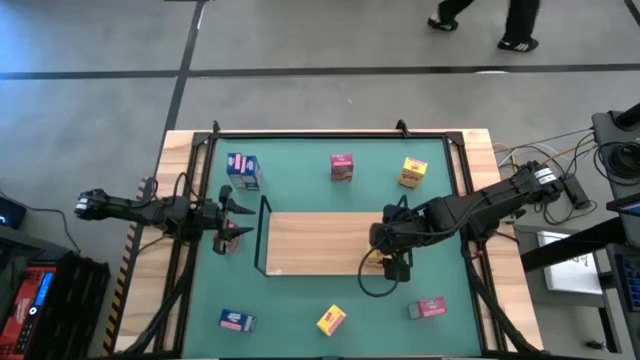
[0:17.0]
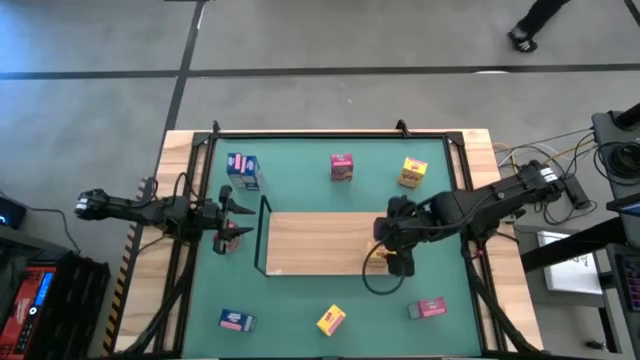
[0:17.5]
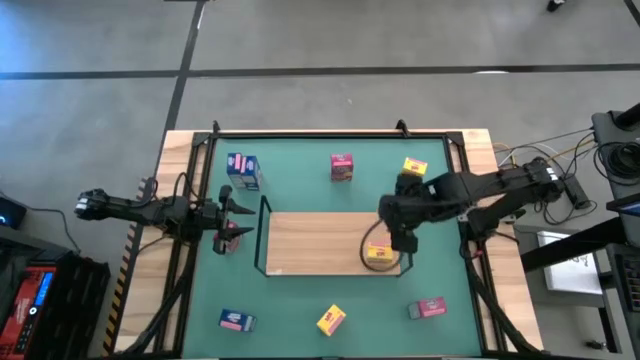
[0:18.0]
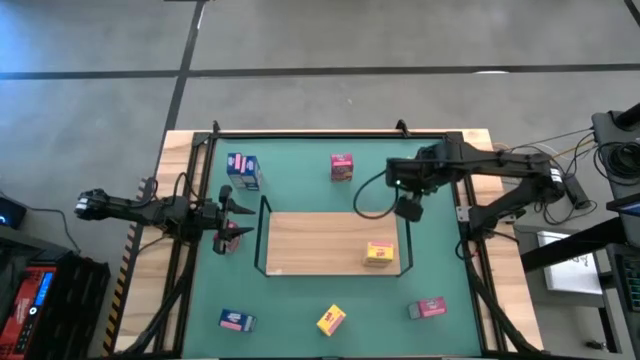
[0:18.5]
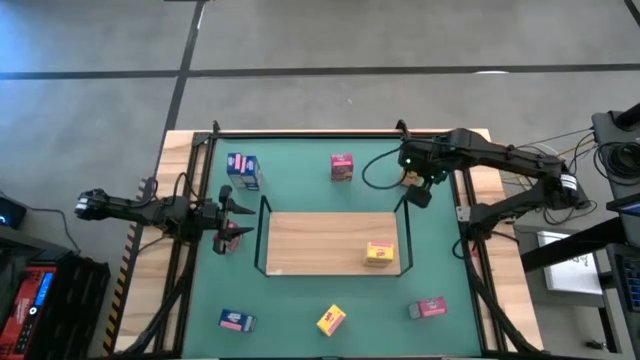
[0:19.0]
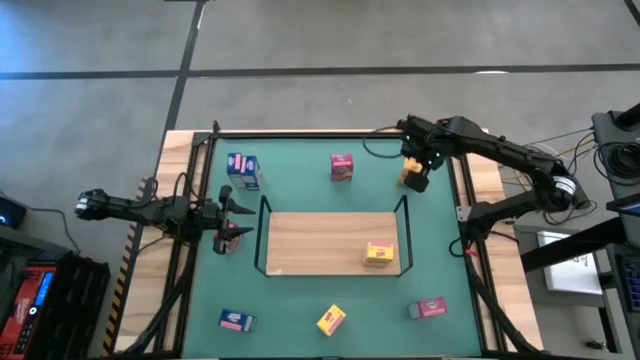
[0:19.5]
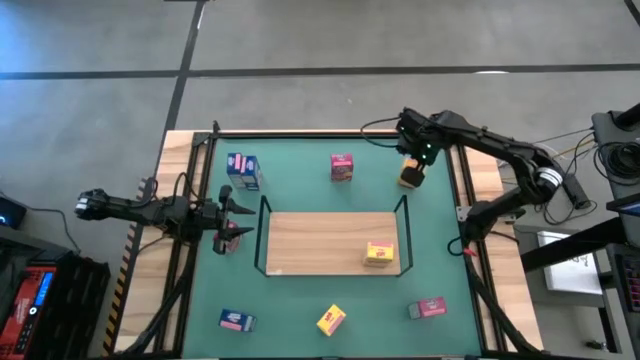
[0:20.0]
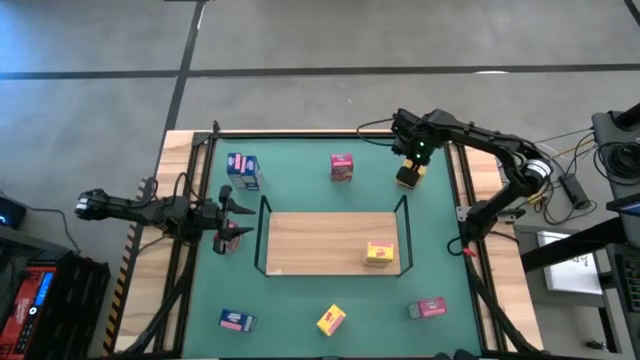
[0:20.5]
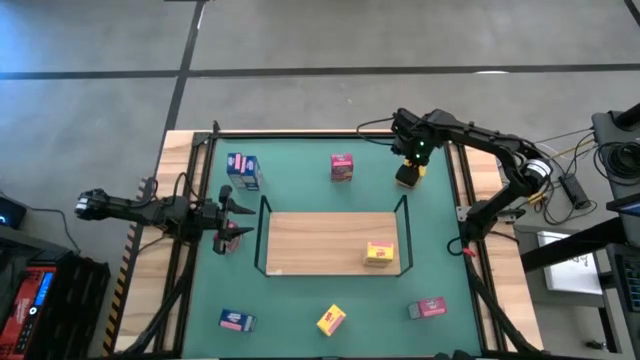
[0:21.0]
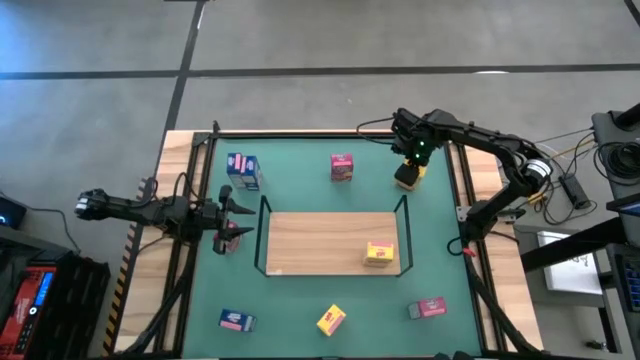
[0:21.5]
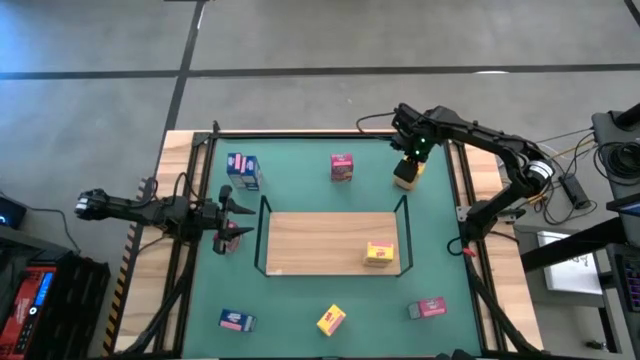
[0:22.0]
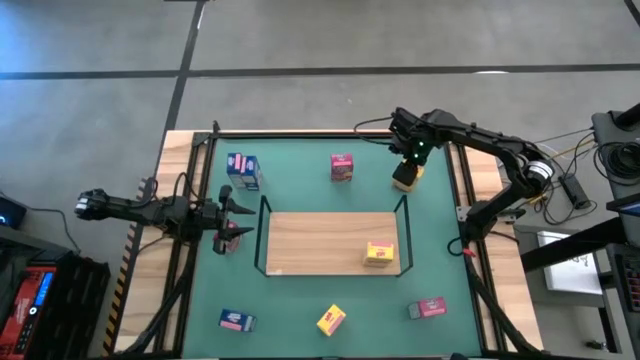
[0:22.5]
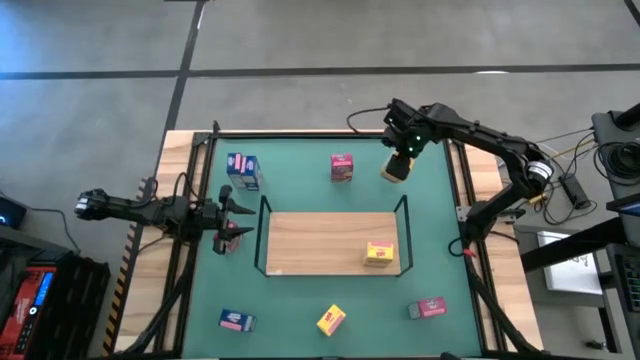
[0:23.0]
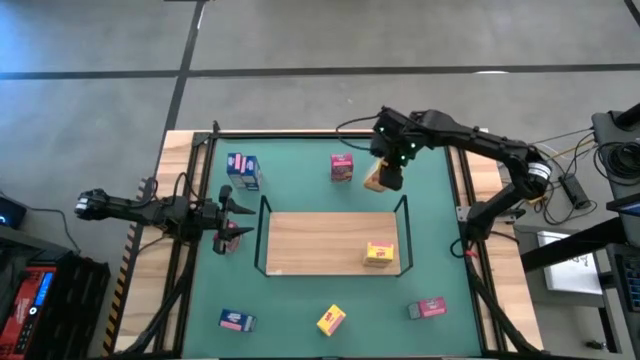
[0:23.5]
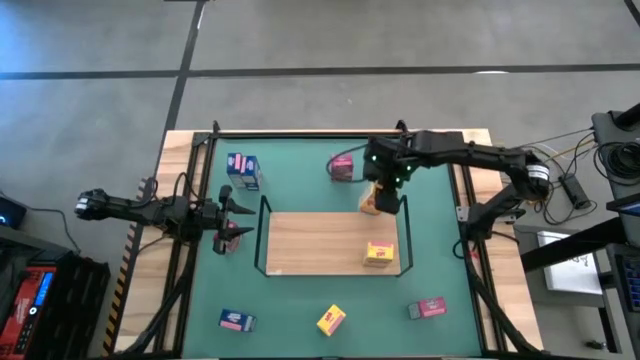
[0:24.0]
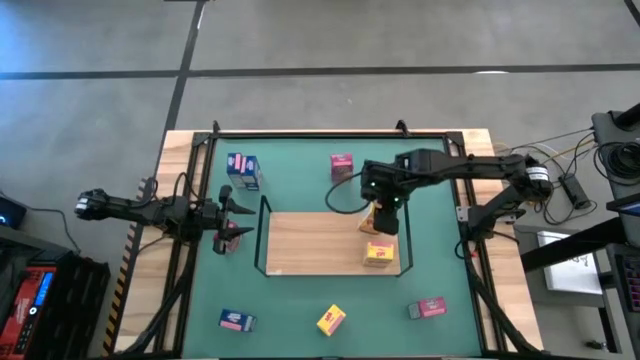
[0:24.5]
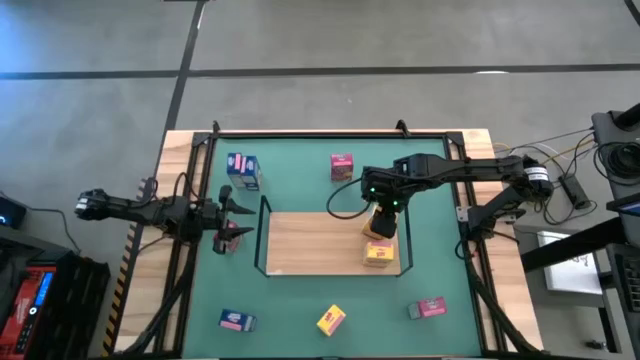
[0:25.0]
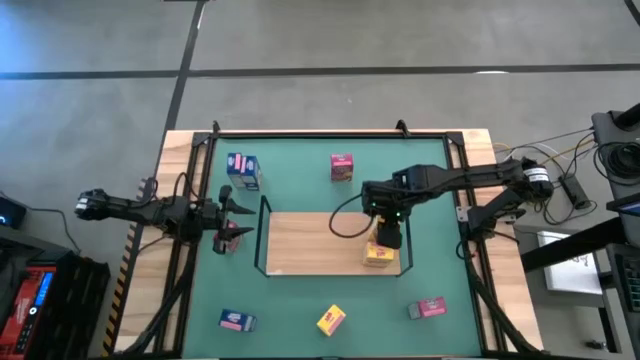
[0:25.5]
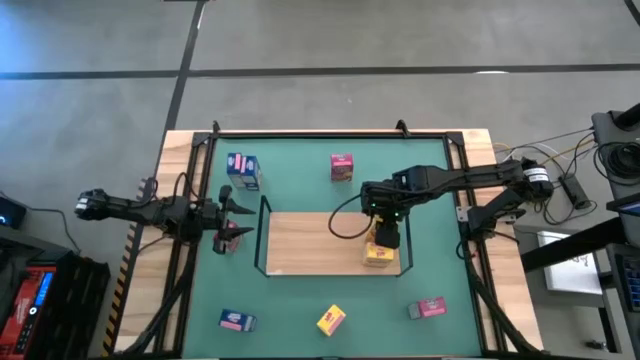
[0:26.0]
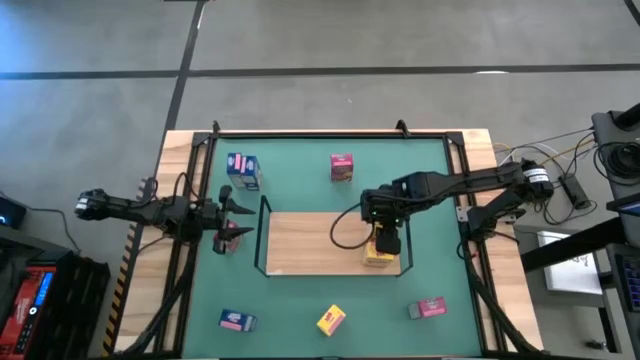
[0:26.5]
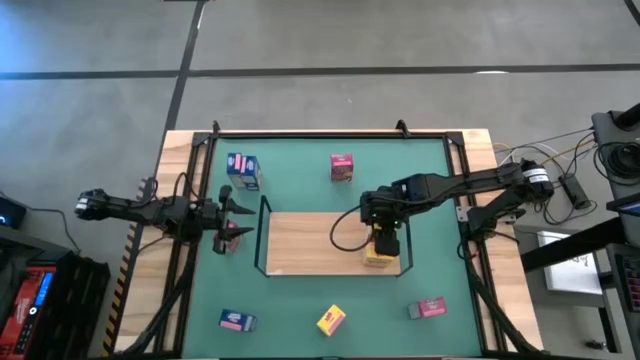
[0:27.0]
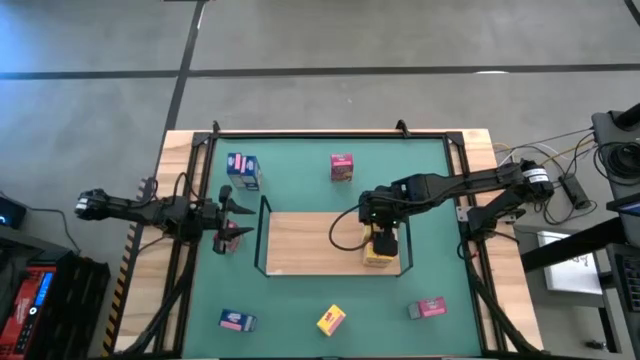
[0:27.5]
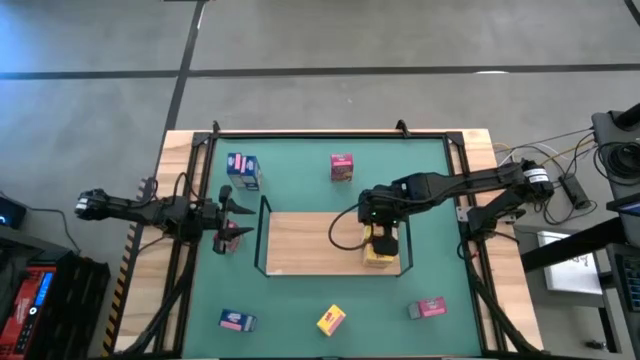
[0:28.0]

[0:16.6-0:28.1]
Task: Stack cereal on shelf
Put the top yellow cereal box on the shelf aligned with the other yellow cereal box

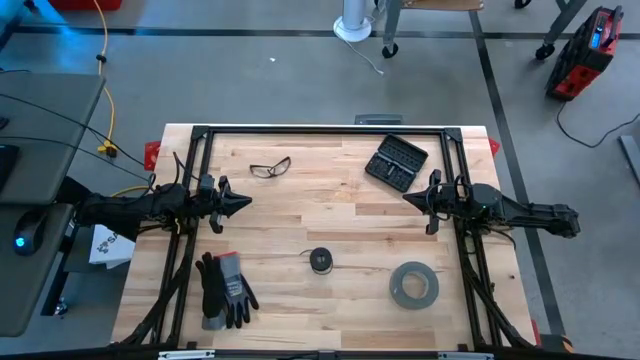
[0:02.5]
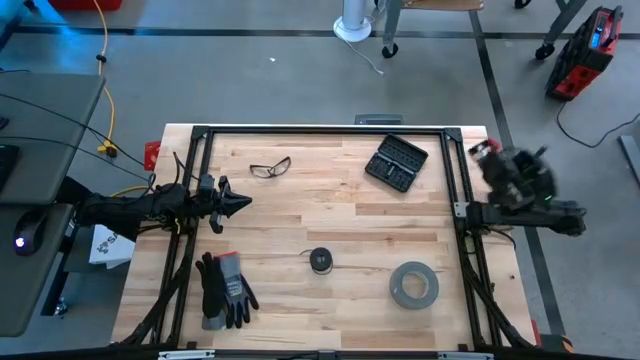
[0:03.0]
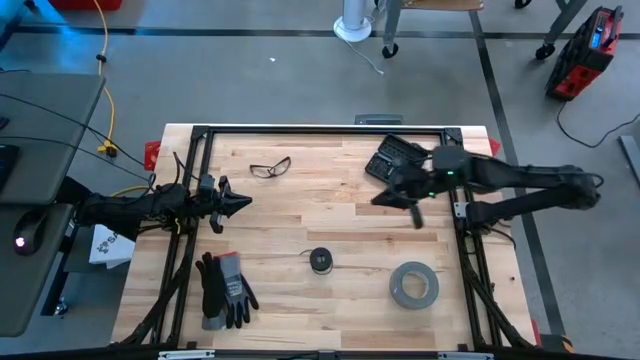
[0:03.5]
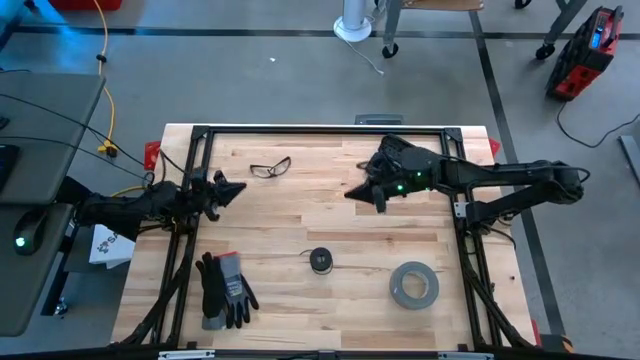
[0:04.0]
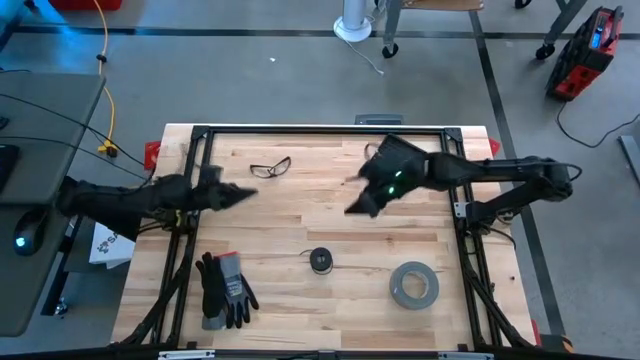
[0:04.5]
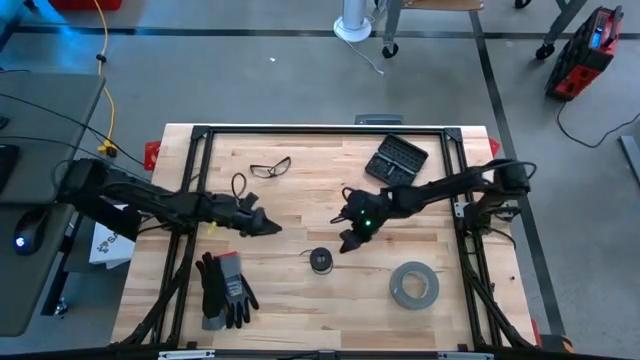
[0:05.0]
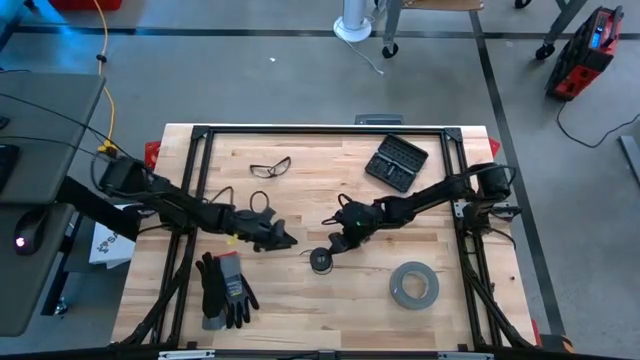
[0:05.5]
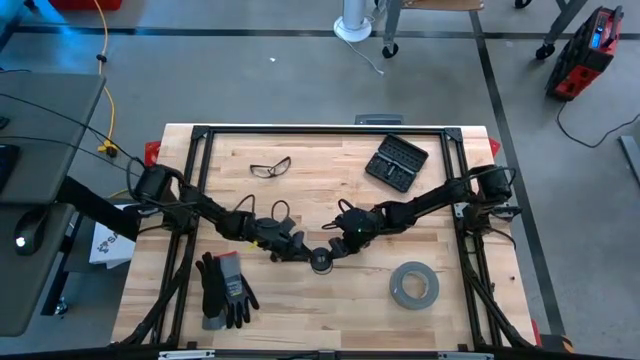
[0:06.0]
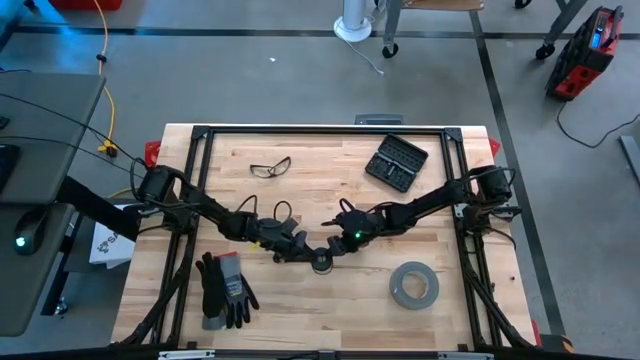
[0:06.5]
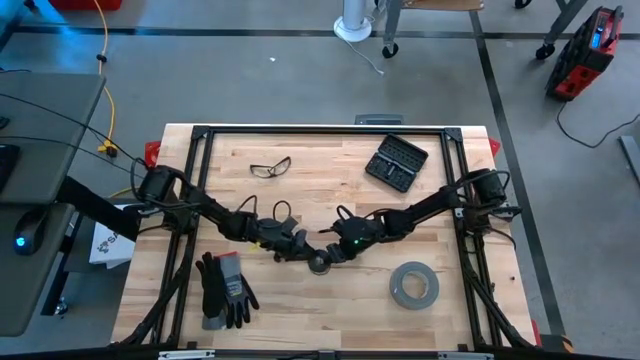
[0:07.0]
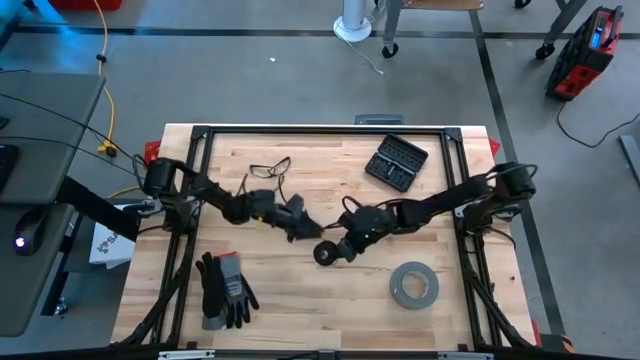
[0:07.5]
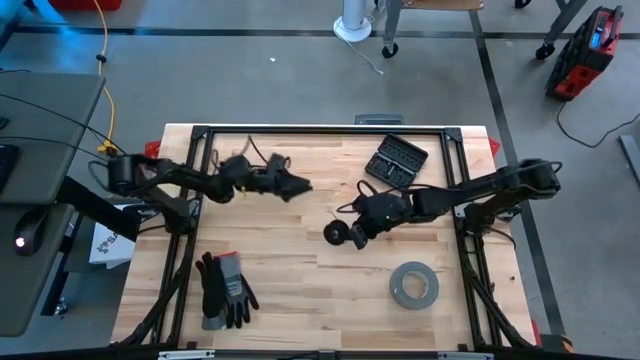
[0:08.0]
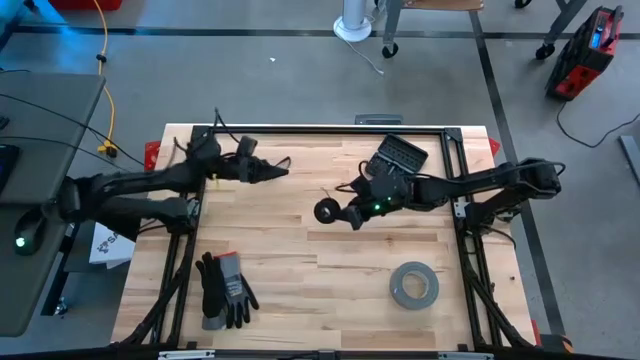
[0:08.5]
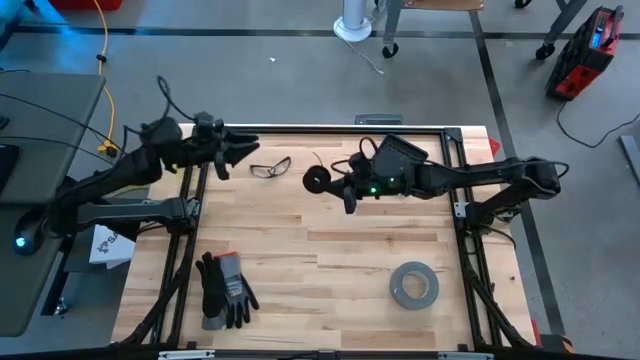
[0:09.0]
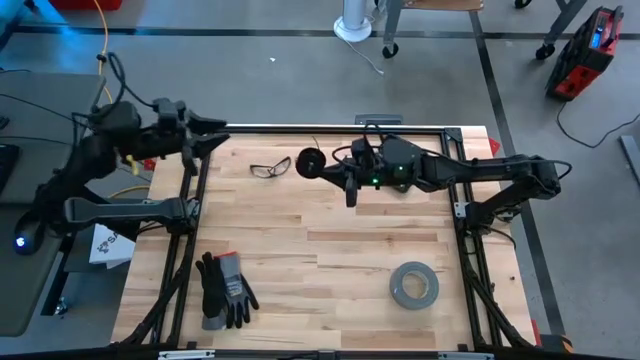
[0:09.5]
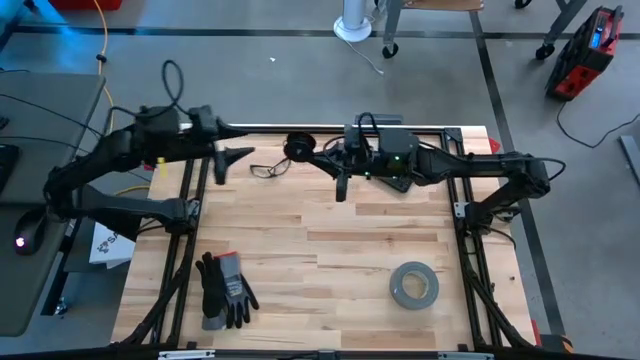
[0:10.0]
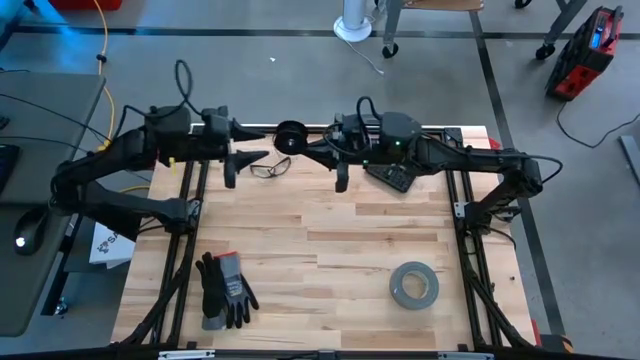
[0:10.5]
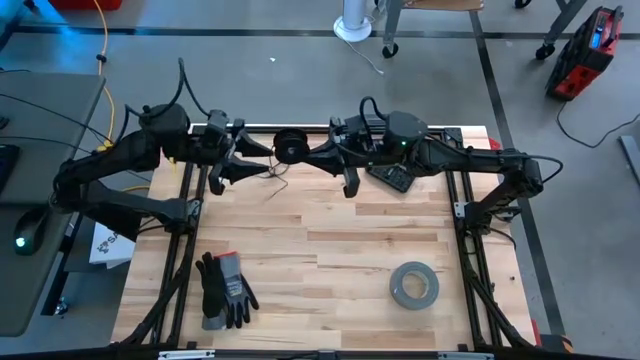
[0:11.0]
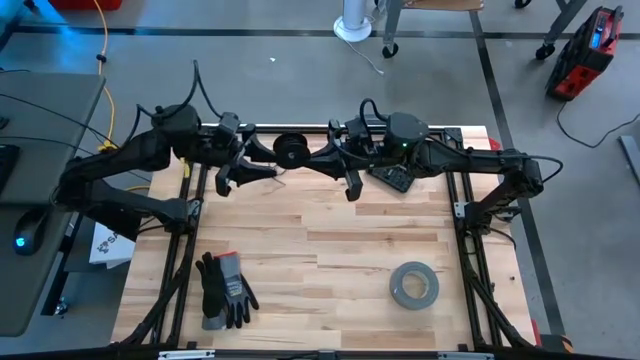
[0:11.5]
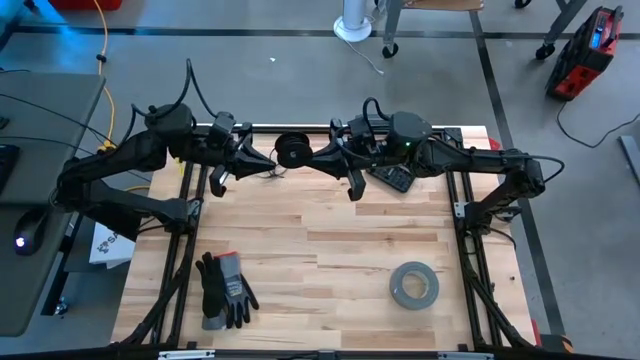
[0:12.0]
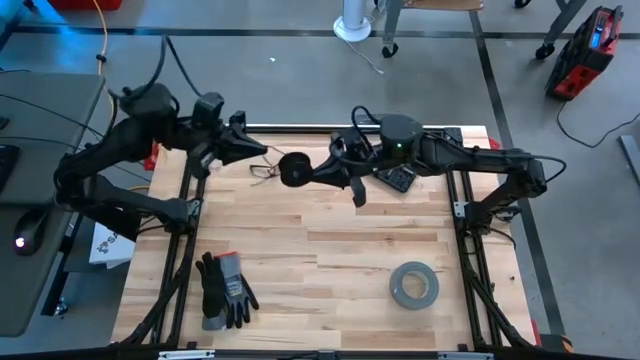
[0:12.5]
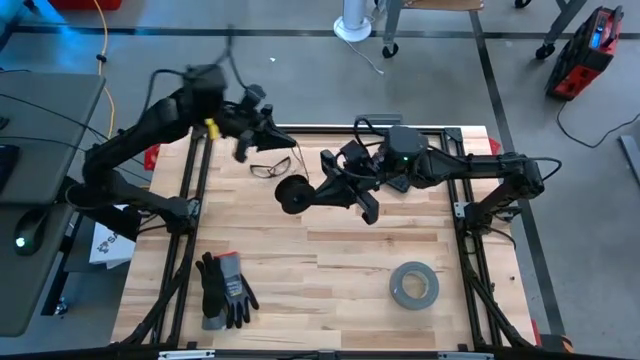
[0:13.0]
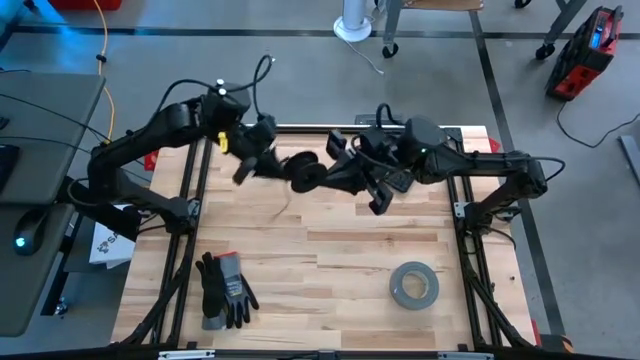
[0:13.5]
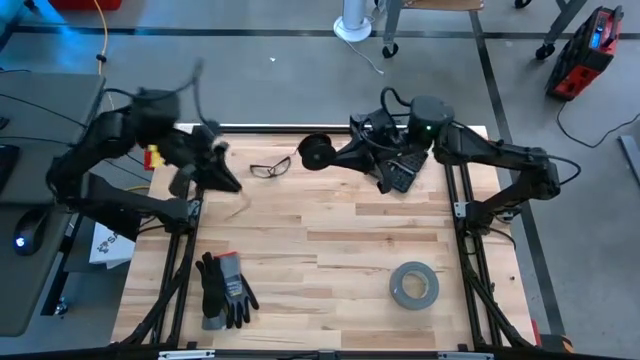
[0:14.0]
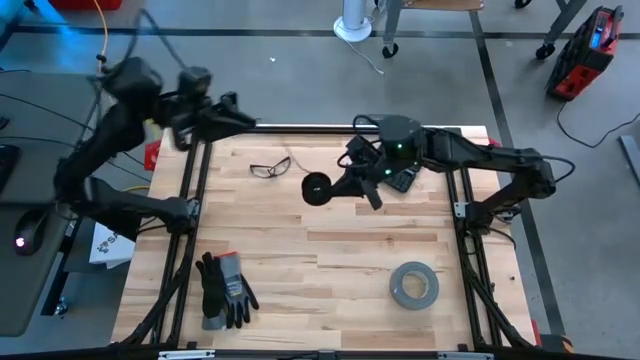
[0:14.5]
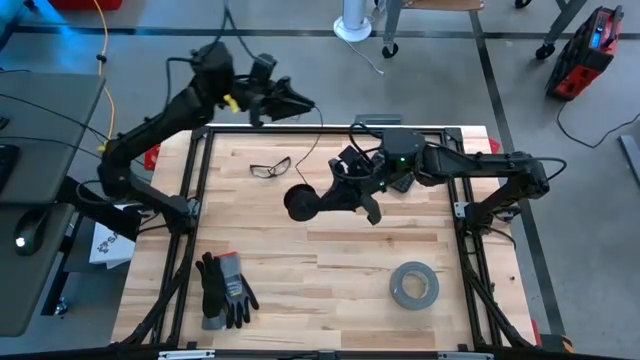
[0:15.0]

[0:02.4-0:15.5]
Task: Coil cords
Uncoil the black wire from the black spool
